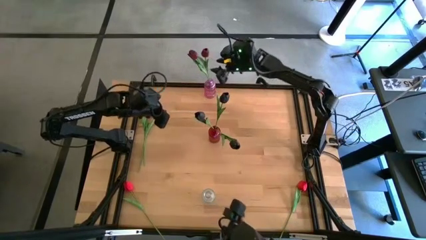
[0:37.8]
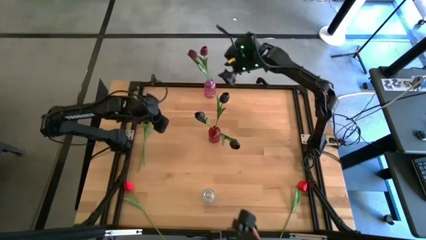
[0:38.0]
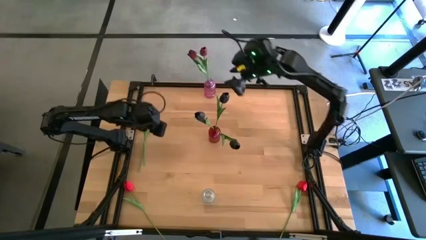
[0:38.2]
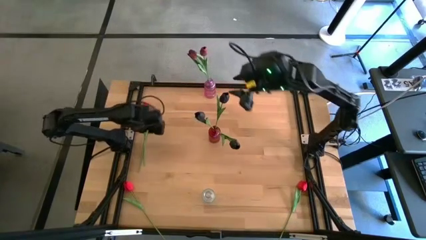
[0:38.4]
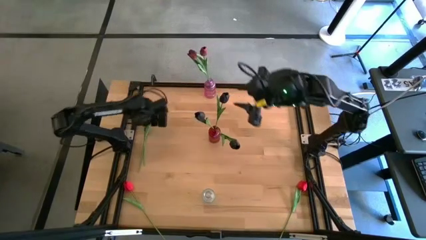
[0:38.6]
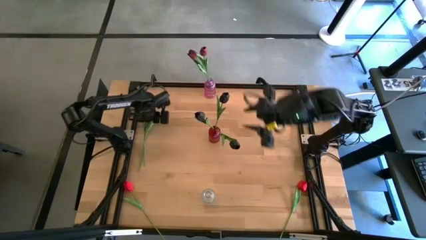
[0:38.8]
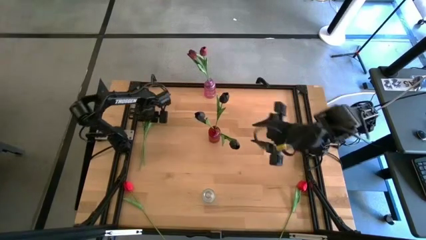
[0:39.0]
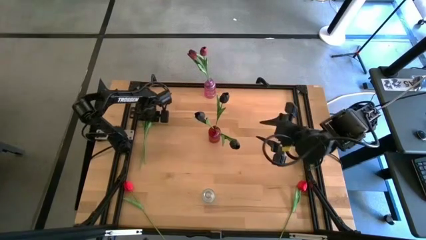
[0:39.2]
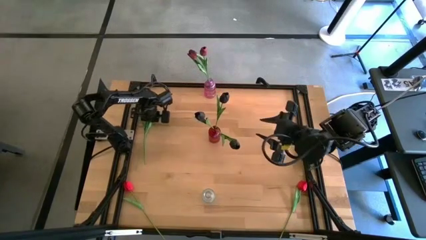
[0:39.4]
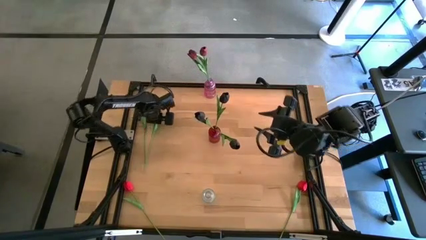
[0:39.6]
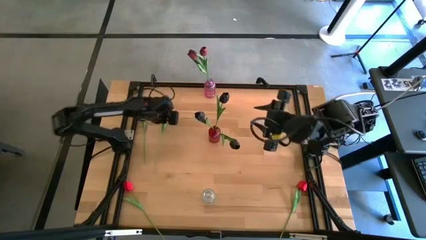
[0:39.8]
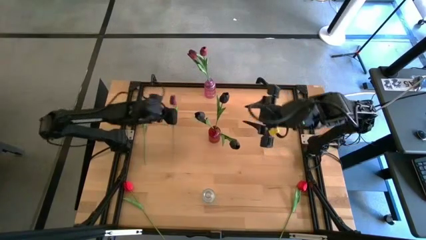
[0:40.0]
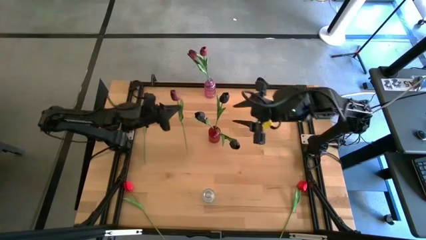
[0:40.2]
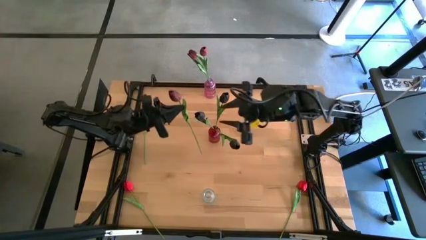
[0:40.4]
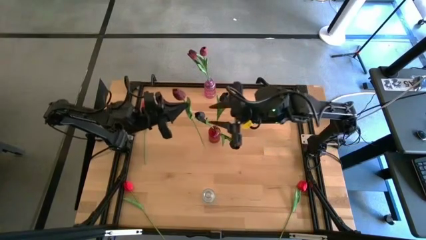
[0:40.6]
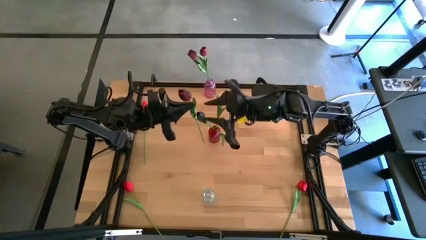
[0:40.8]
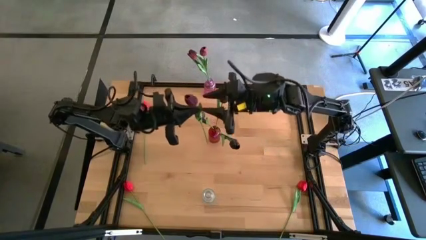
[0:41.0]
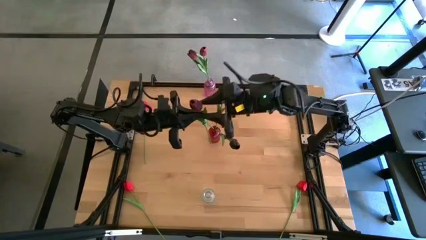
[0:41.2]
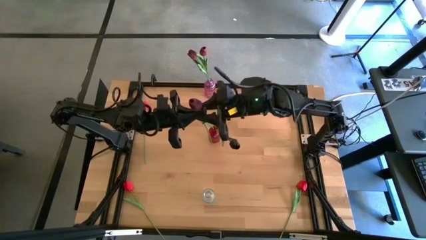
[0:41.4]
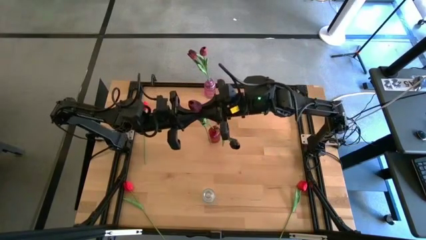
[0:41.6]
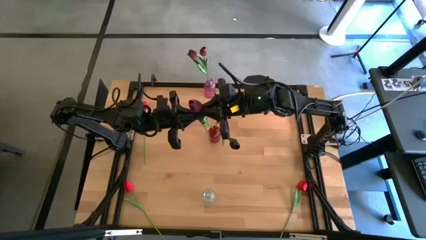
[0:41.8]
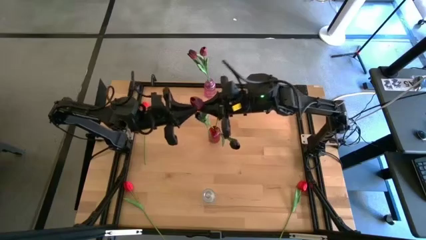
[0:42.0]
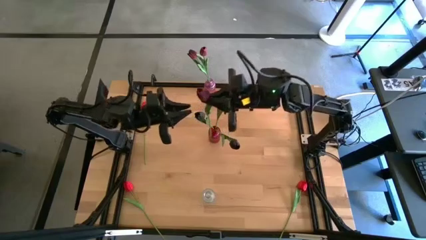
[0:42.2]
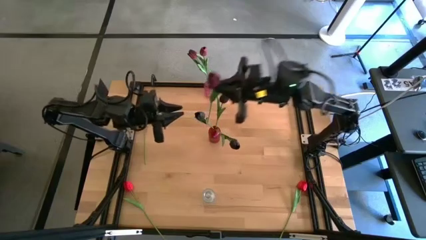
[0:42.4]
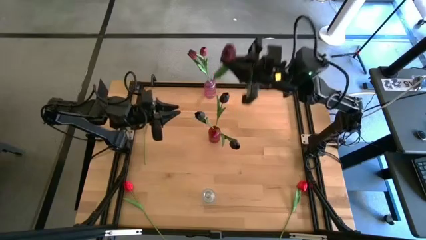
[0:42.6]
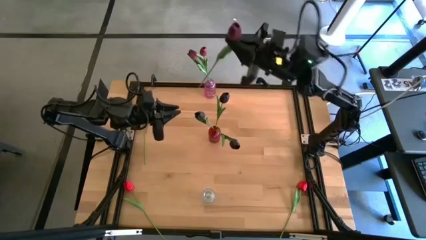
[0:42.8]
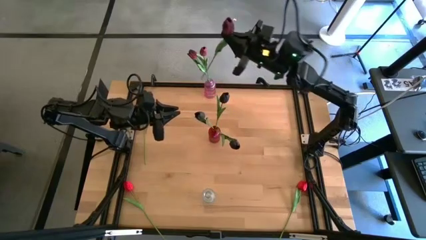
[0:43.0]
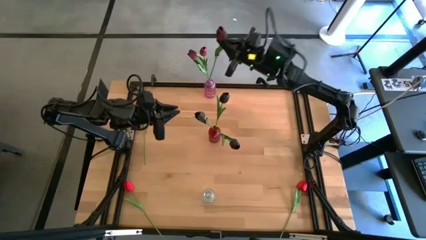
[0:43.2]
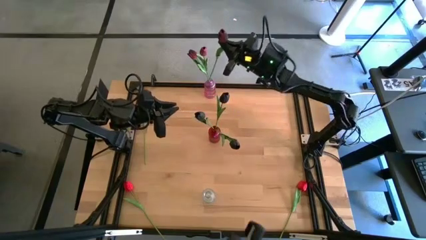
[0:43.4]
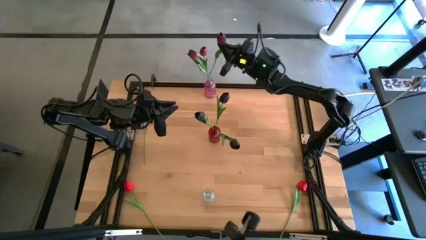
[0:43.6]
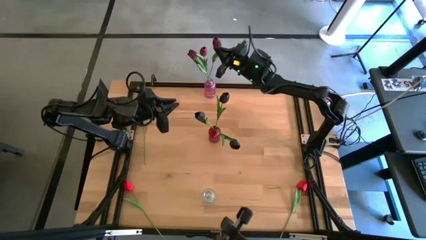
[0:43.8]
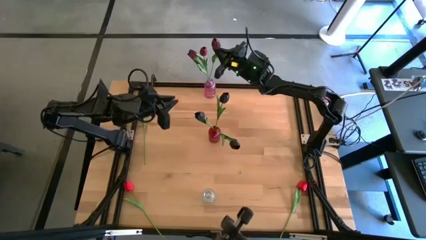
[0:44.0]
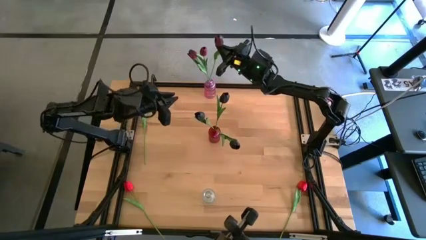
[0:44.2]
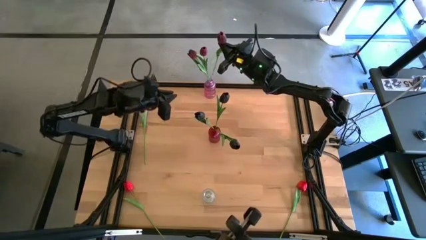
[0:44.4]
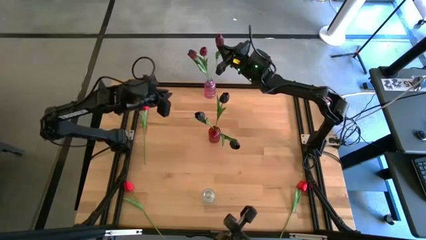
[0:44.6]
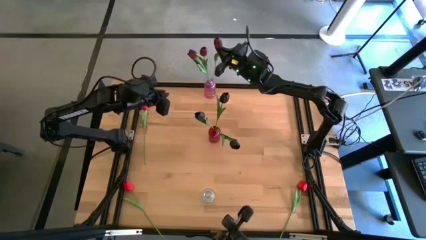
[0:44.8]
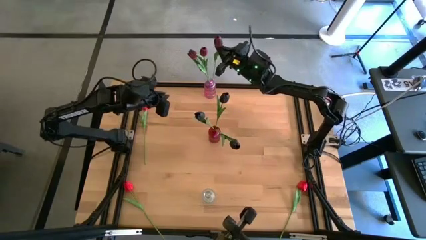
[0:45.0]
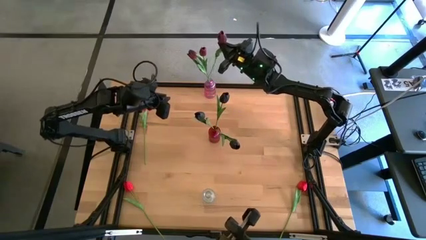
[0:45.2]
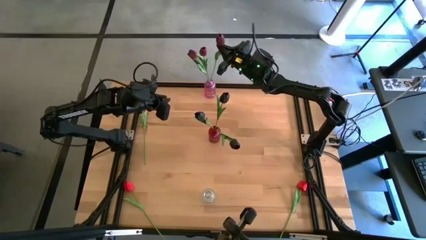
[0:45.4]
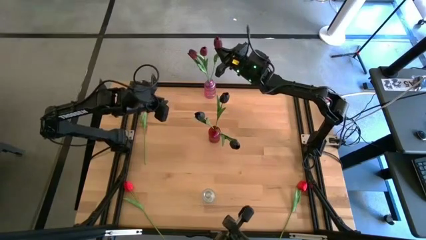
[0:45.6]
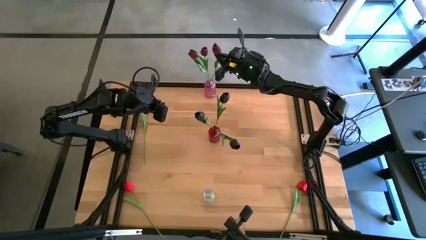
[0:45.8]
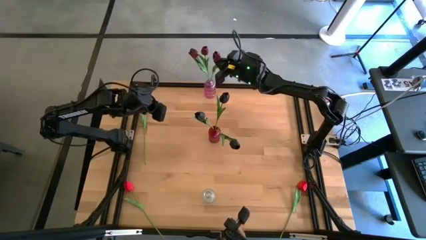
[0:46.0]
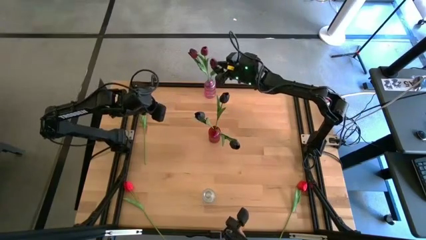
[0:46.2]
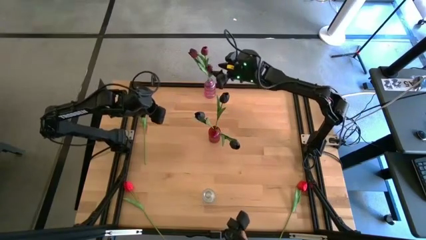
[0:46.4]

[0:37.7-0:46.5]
Task: Sort flowers into vase by color
Put the dark red tulip into the pink vase

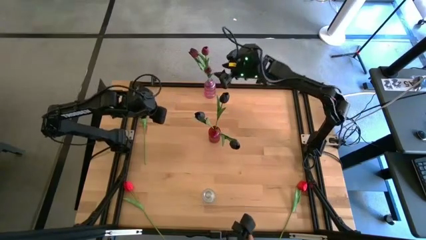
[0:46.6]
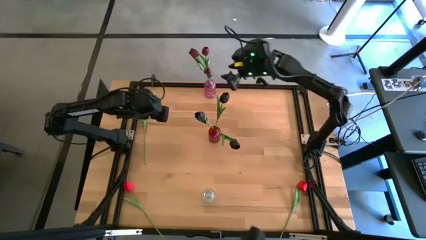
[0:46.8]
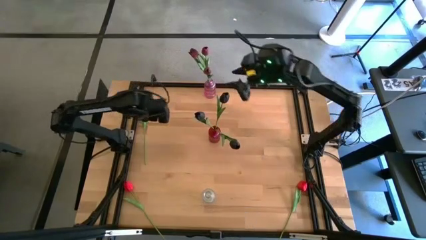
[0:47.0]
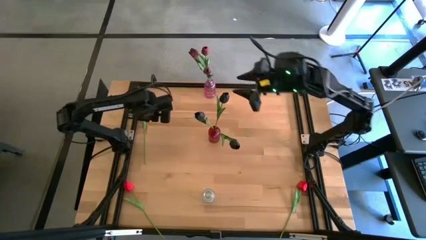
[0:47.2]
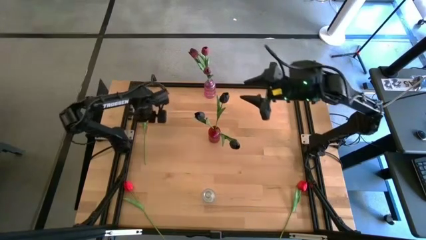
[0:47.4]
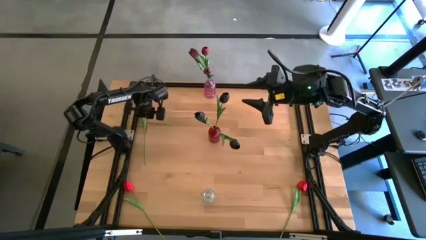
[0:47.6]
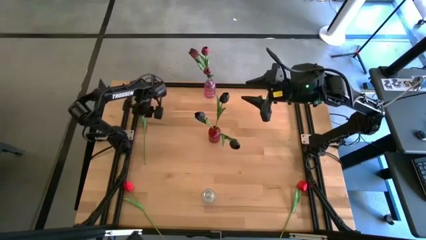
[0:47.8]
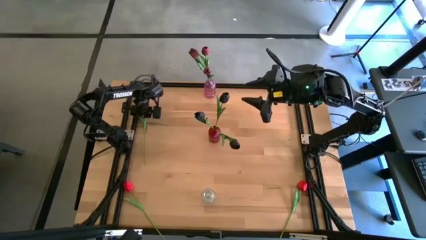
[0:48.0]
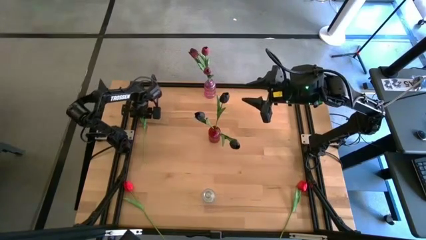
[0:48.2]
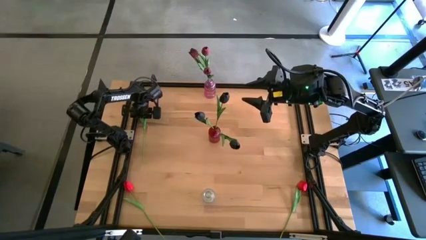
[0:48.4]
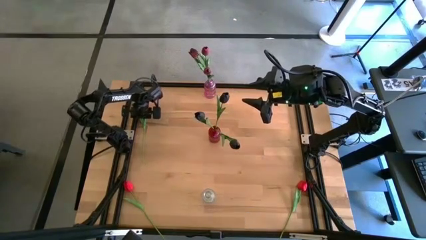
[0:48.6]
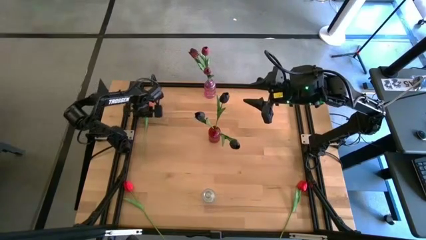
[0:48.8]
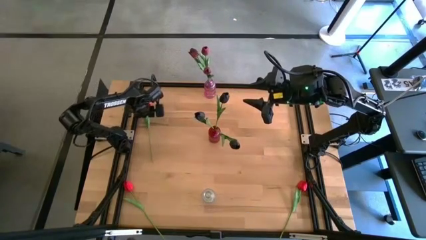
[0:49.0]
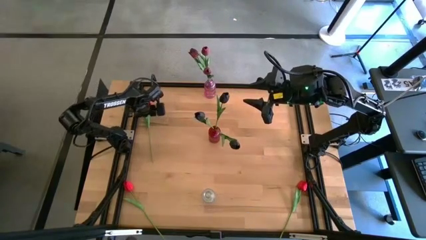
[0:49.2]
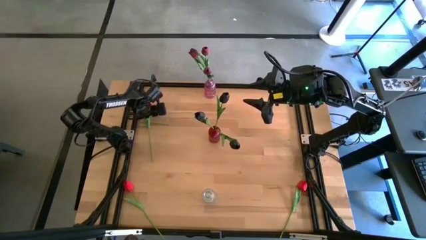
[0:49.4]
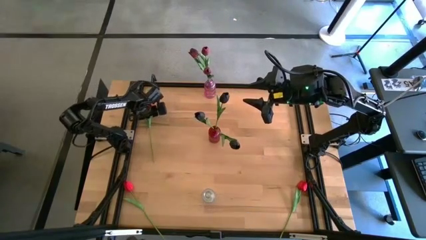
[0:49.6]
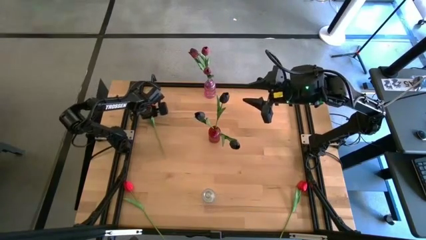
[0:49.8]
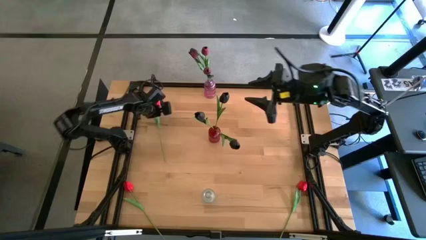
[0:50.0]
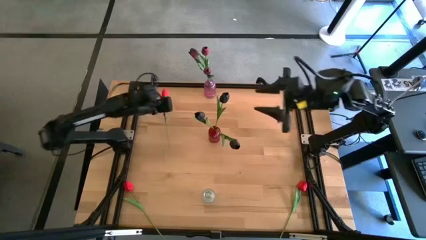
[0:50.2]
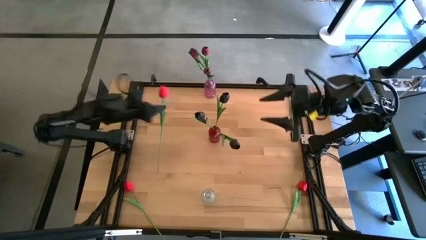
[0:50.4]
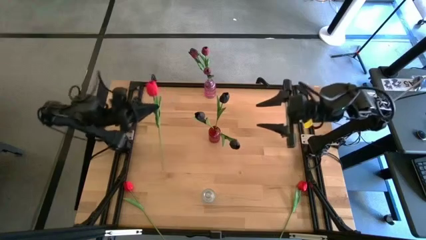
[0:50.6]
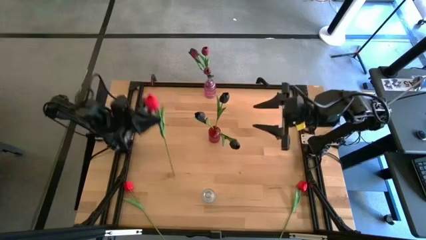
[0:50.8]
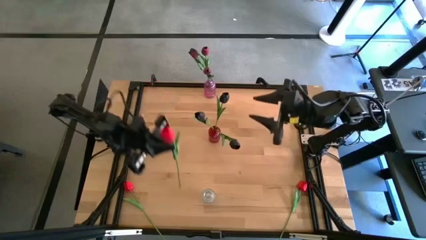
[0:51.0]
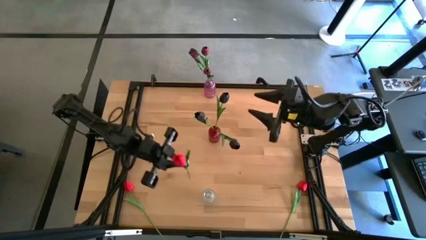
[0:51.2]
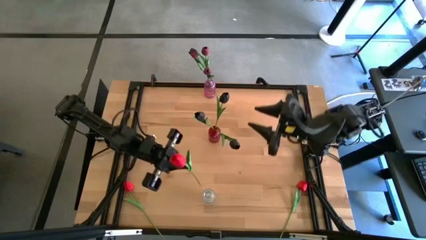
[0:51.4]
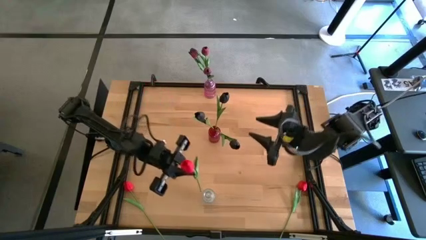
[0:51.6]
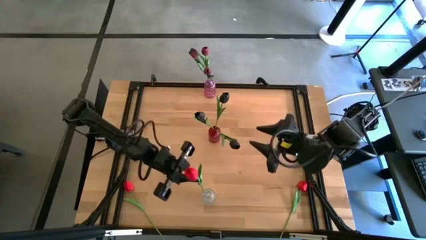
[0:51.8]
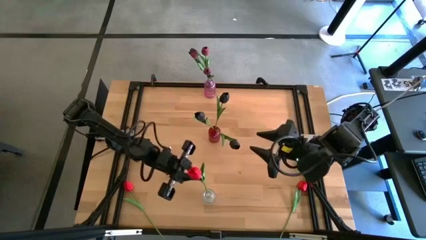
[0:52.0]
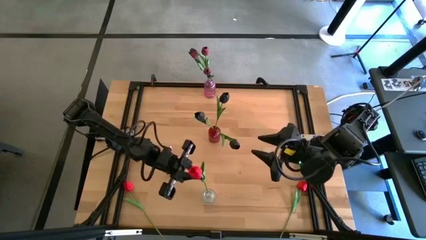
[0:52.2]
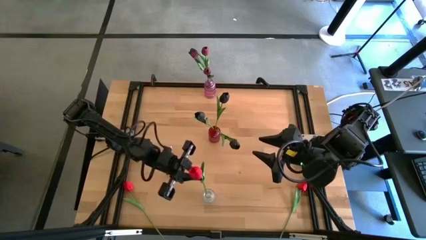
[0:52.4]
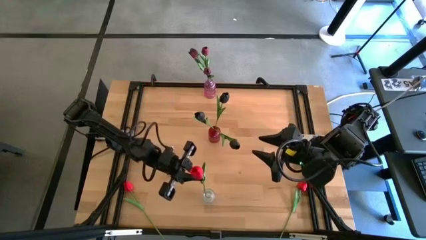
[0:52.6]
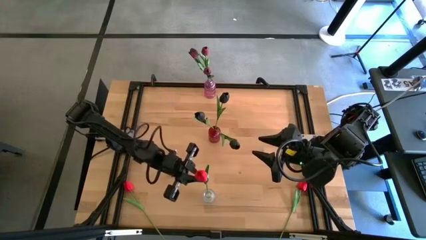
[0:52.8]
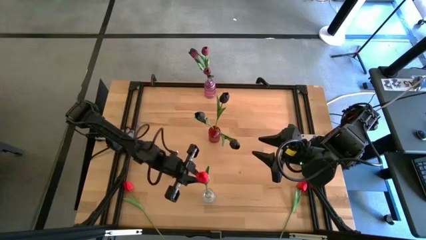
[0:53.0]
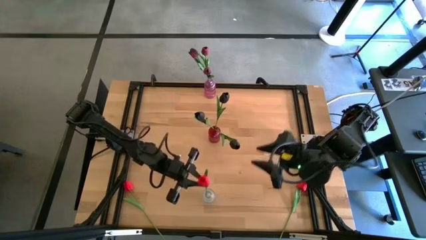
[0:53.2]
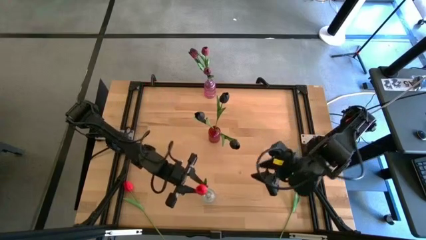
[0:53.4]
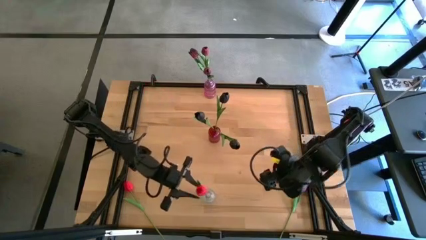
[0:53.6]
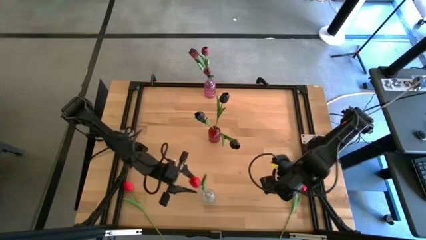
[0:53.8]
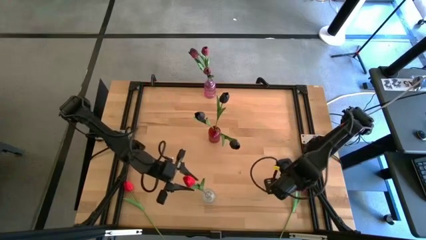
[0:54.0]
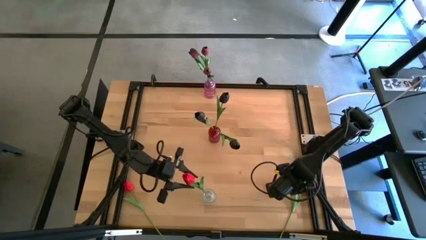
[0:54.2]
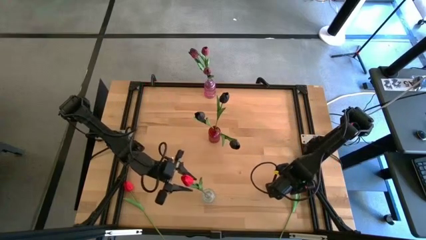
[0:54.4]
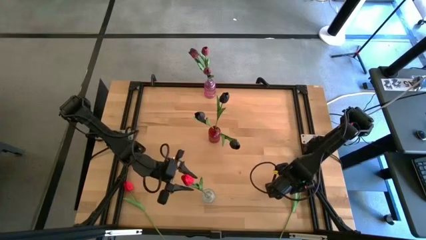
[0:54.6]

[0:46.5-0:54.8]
Put the top red tulip into the transparent vase
